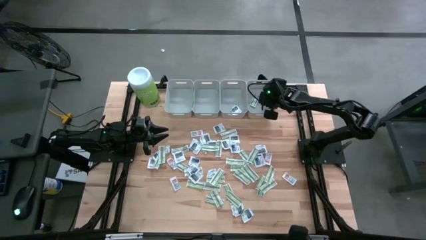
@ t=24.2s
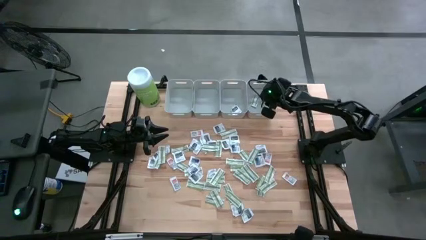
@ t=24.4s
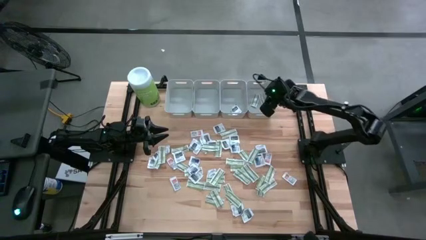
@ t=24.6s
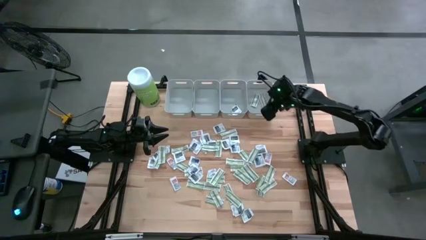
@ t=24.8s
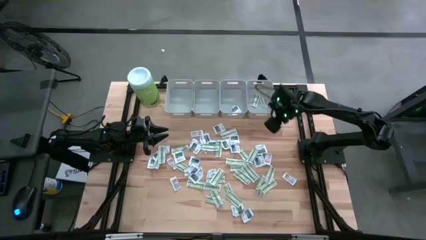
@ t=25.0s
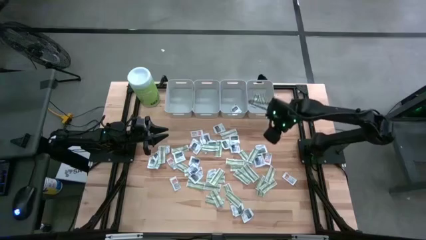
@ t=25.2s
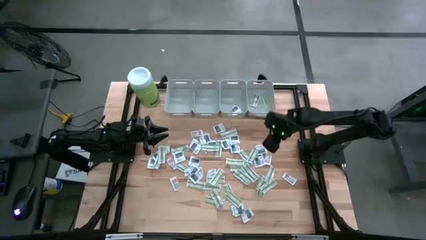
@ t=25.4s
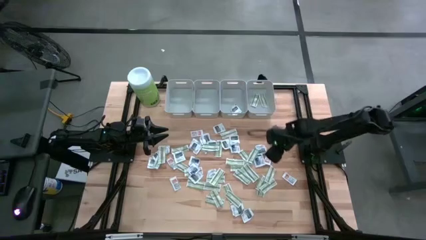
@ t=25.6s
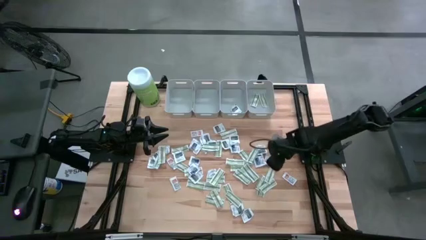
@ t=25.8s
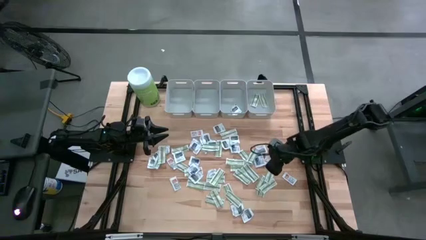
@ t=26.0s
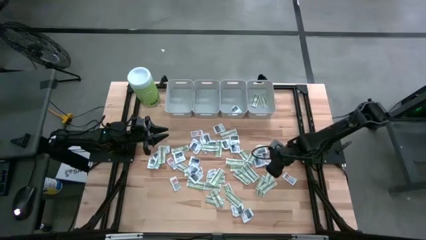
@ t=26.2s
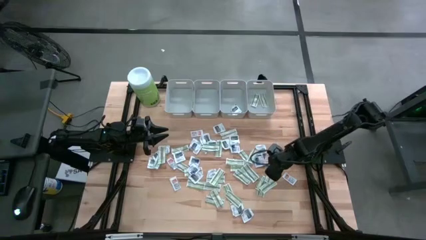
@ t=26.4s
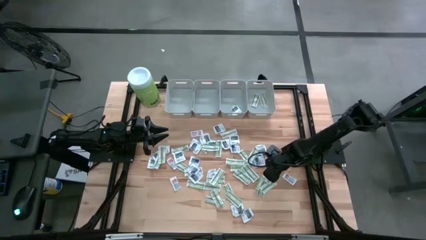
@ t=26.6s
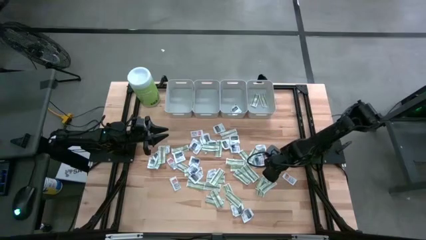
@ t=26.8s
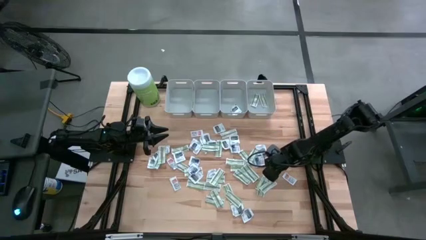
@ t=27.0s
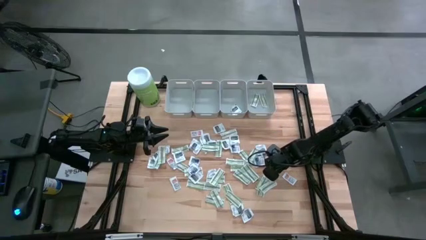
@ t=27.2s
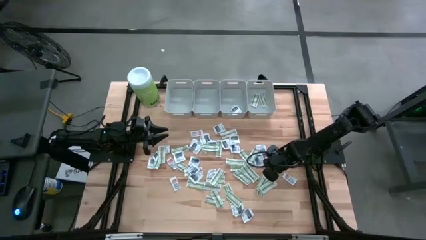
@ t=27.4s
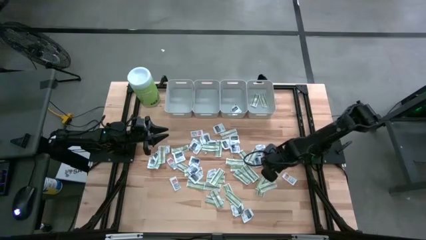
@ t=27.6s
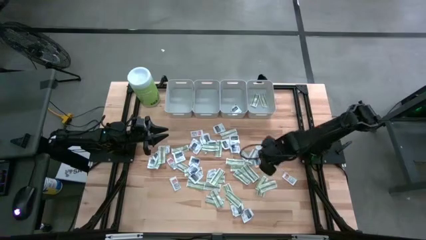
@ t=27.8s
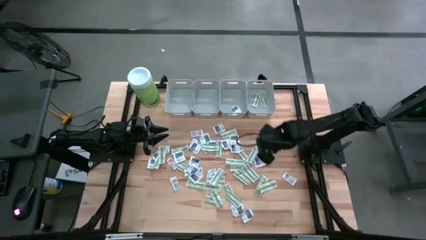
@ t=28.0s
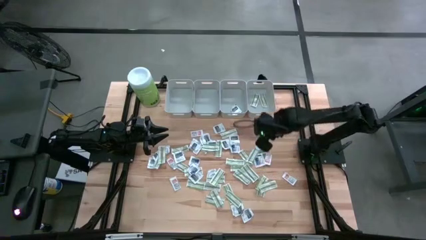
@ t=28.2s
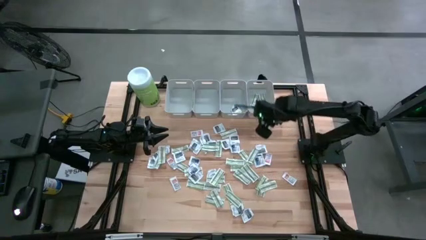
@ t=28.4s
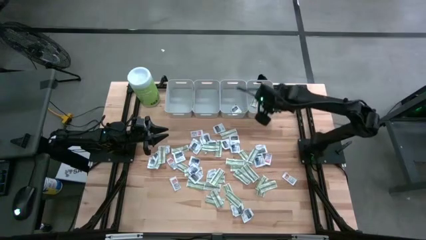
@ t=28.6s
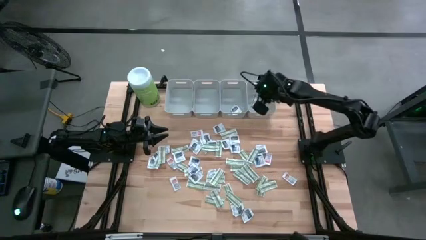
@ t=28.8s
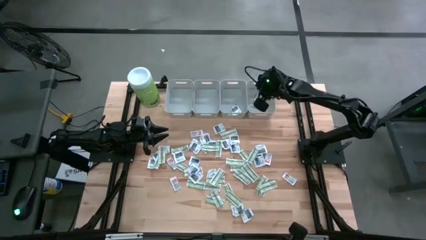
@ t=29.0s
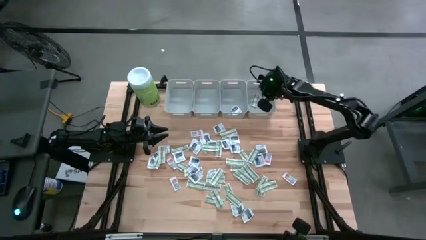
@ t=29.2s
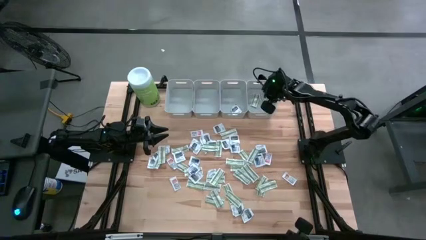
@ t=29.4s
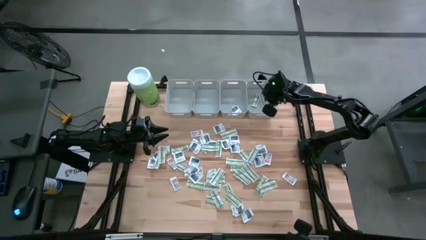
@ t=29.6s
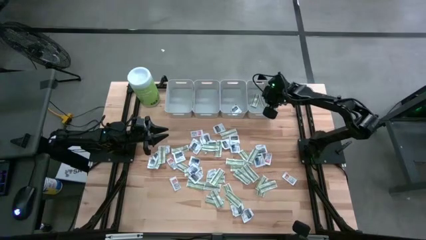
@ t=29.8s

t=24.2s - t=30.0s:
Task: Pick & Place First Aid Supplies
Put the bandage into the right gray bin

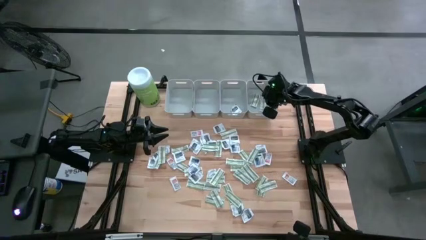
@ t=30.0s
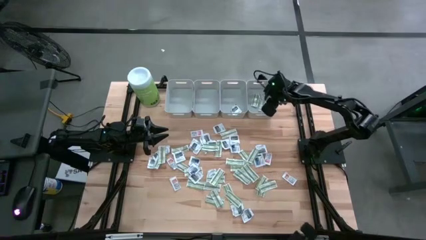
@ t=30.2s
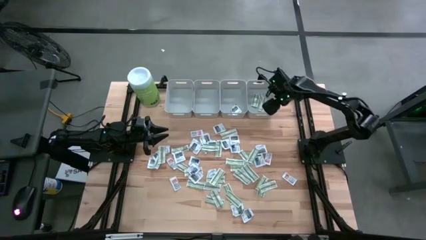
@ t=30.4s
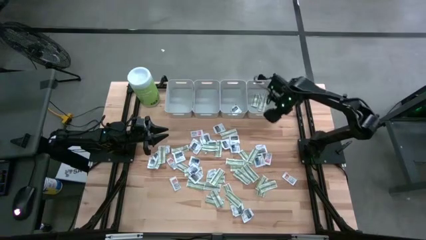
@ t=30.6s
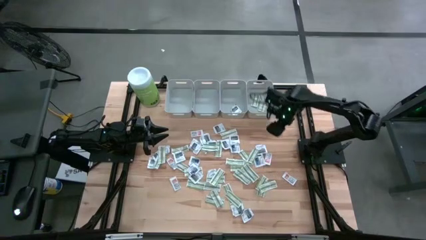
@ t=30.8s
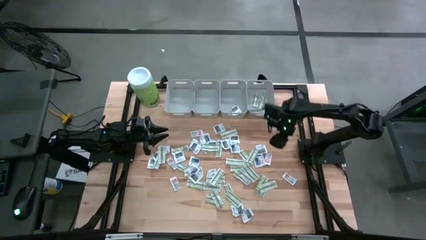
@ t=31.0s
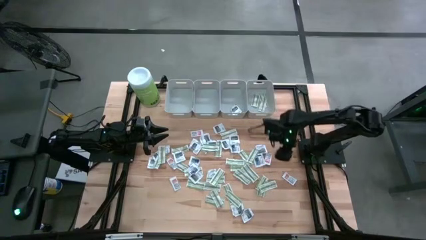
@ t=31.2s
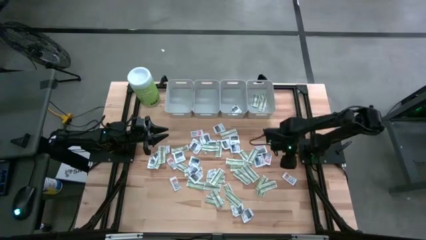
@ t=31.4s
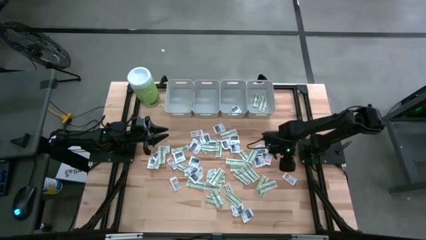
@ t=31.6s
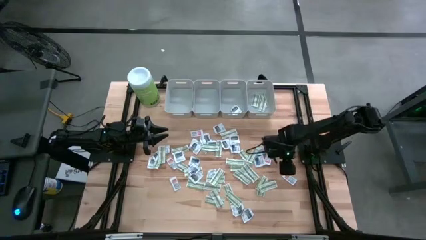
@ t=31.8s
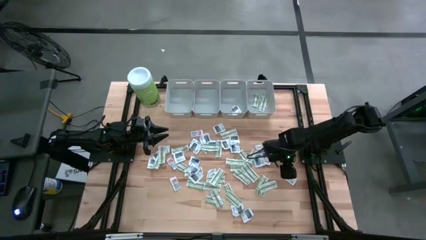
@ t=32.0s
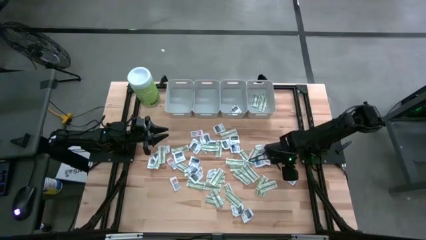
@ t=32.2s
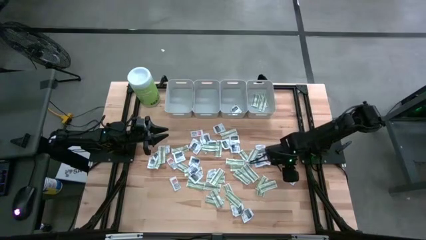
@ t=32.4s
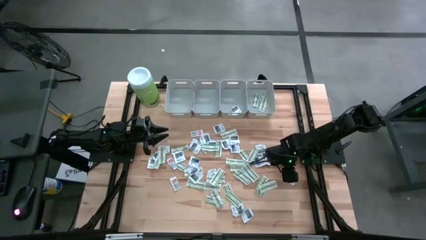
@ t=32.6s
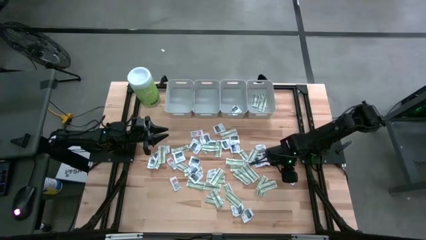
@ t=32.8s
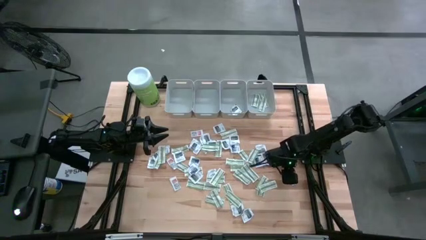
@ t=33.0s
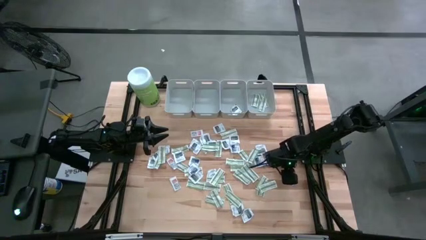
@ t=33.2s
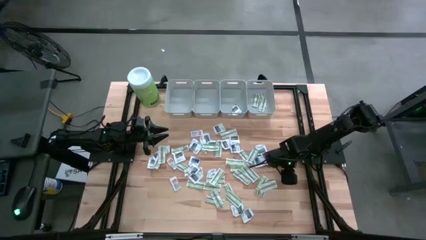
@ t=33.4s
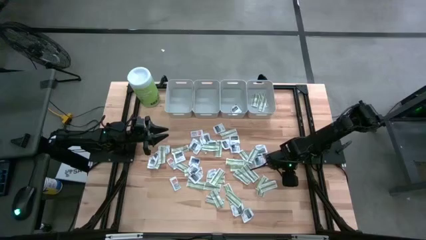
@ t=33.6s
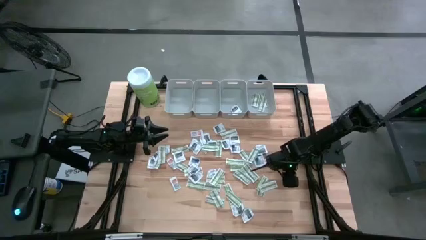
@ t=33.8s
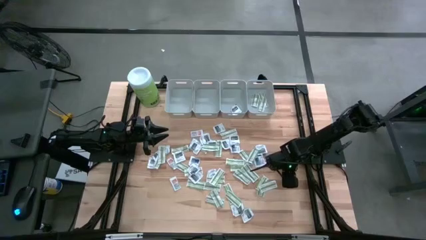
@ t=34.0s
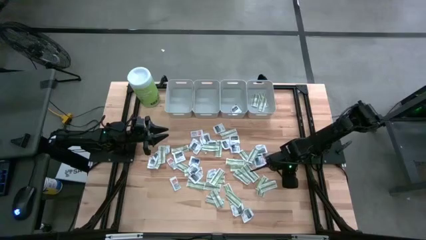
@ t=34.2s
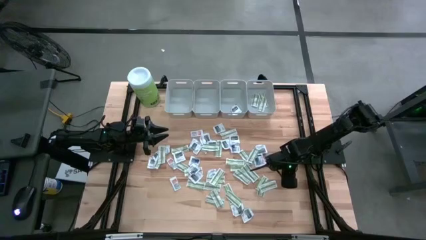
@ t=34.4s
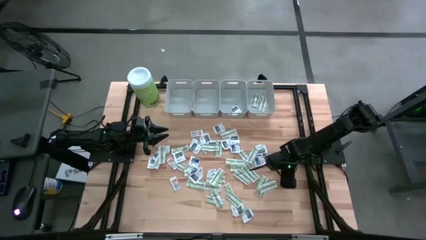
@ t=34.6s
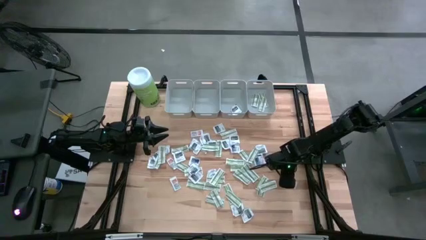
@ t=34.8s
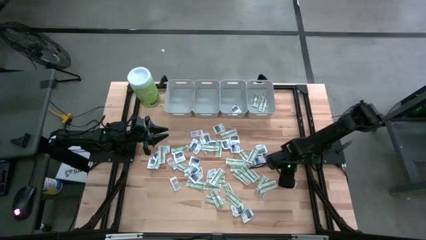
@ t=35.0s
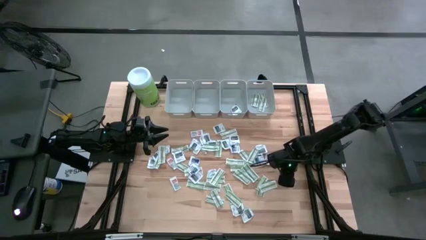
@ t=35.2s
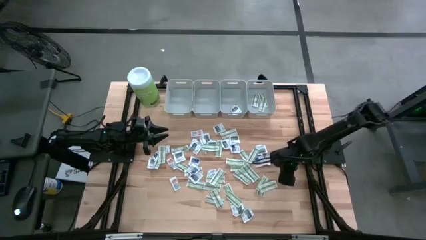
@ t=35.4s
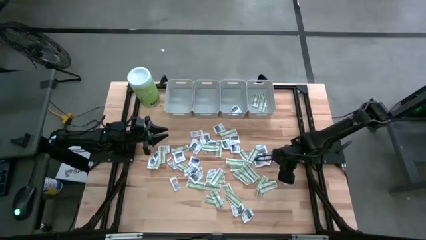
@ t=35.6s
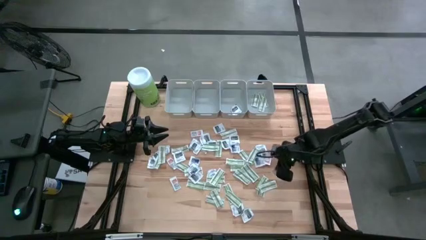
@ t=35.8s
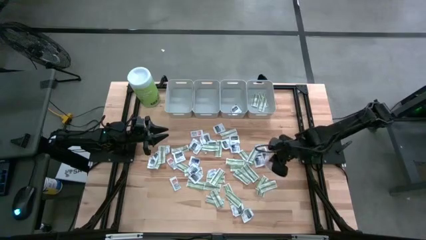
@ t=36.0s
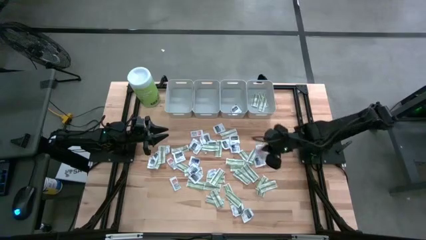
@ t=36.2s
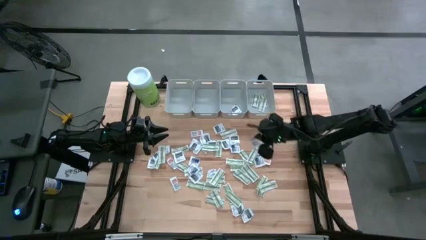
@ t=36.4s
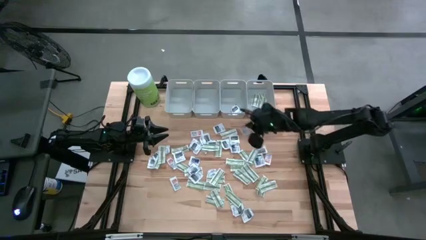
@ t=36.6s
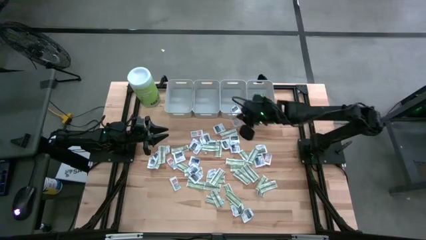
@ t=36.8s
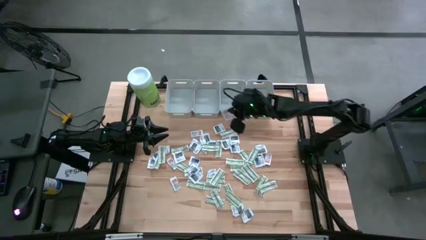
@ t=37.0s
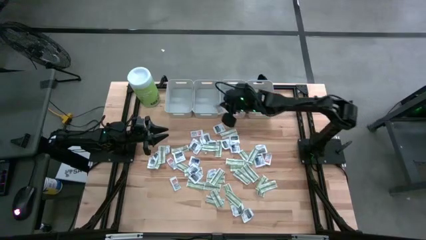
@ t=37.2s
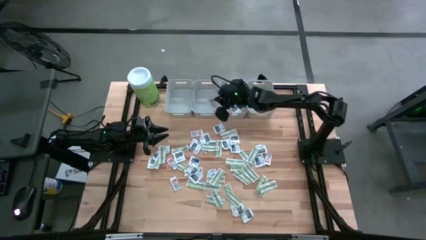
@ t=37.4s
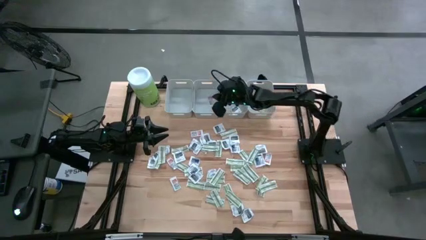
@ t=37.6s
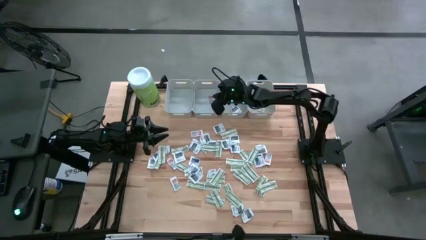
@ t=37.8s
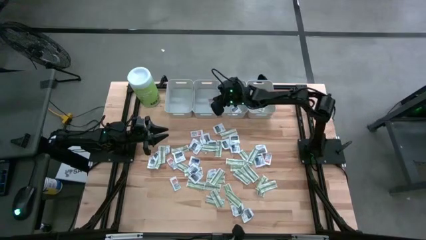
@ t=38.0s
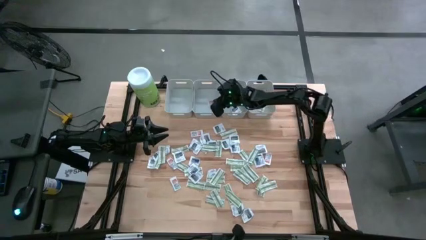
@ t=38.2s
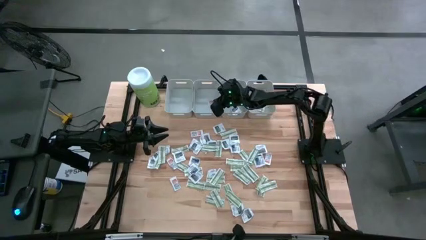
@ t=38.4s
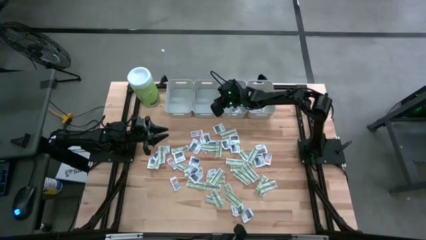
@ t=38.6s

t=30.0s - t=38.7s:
Put the ointment pack into the middle left gray bin

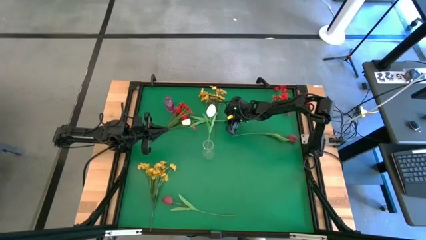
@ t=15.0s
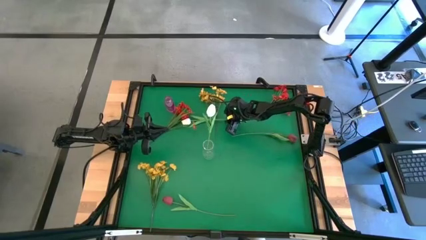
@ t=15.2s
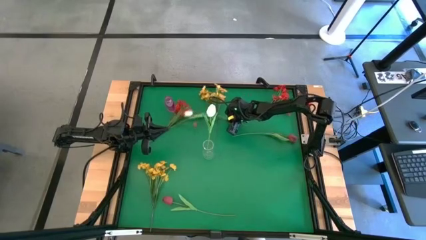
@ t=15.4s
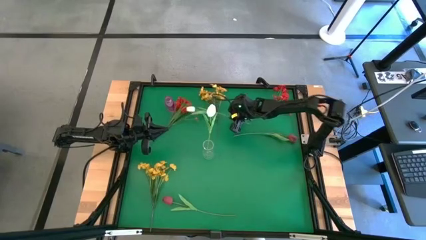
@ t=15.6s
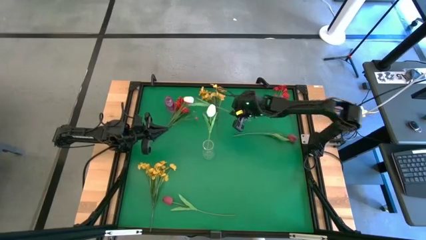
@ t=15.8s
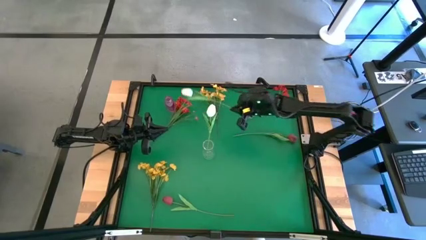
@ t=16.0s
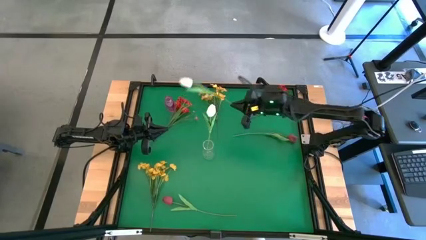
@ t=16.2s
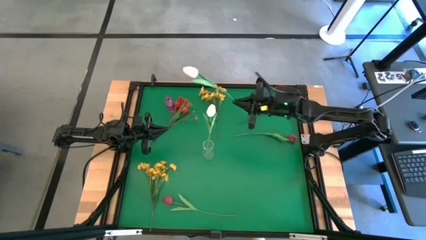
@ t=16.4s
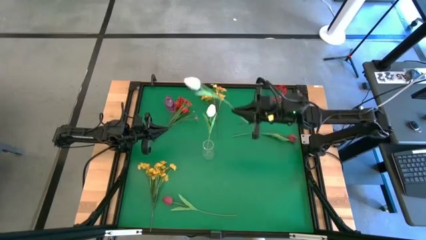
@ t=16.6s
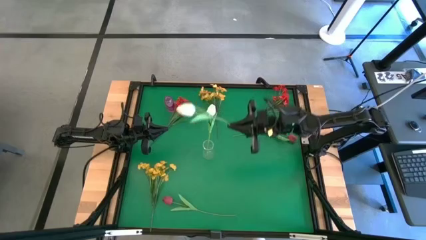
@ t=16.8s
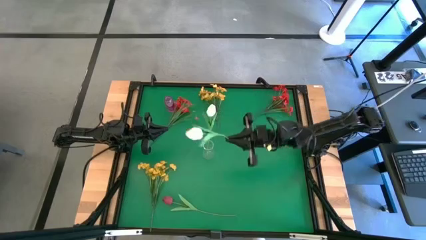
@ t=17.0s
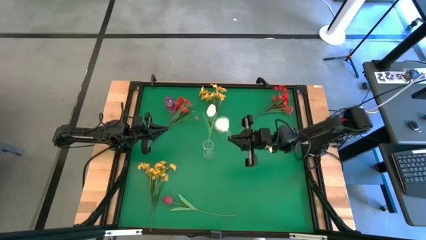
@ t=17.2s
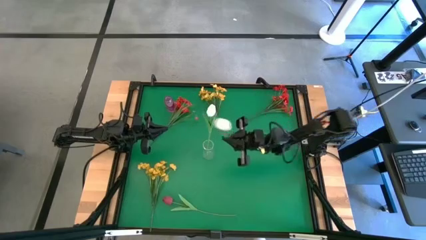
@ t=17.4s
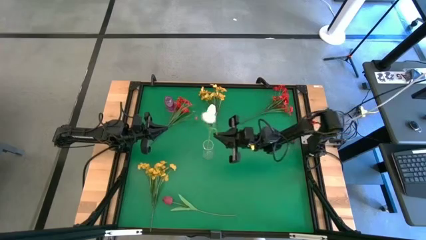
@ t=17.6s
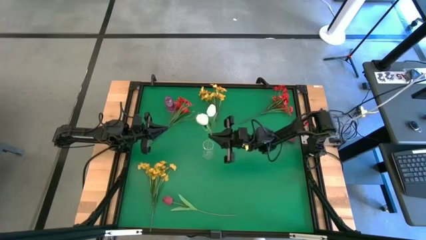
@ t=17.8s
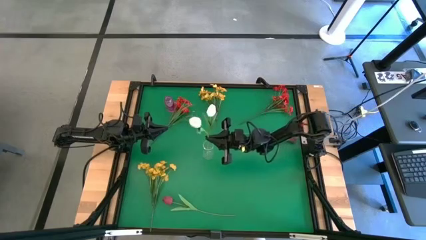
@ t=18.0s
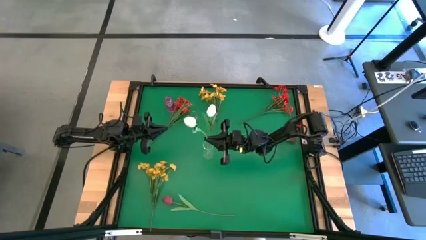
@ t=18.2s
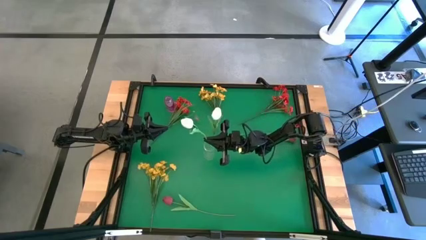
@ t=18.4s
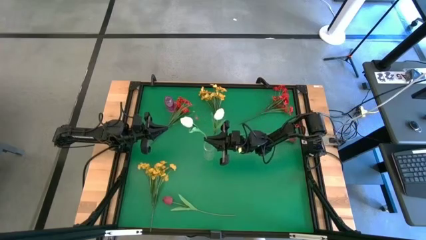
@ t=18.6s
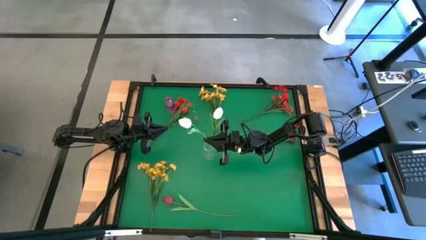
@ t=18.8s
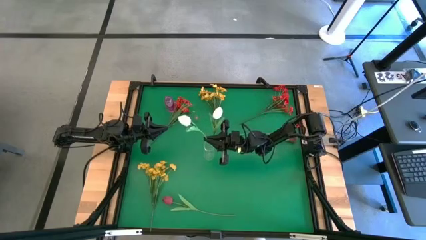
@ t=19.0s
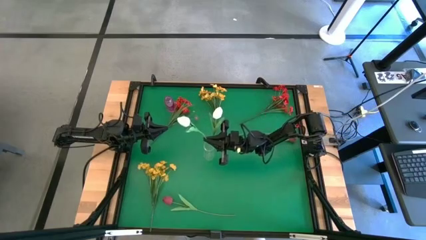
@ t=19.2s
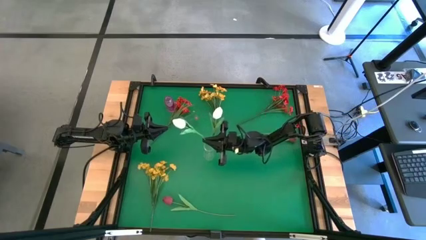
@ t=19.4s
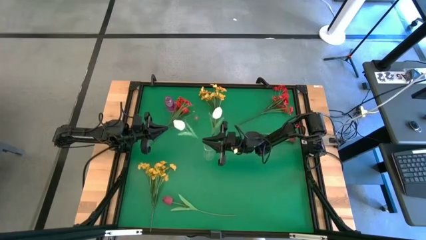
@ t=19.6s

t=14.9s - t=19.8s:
Task: Sort flowers into vase by color
Put the white tulip into the transparent vase
